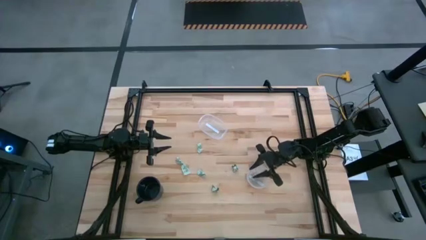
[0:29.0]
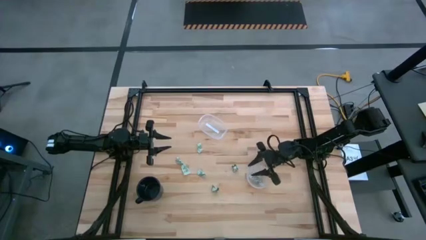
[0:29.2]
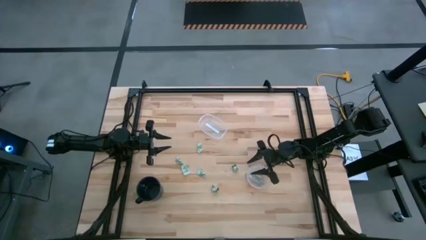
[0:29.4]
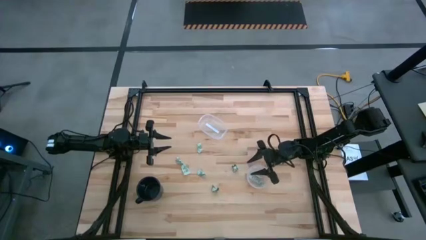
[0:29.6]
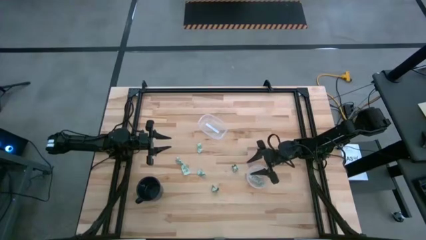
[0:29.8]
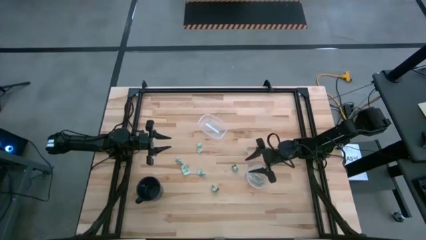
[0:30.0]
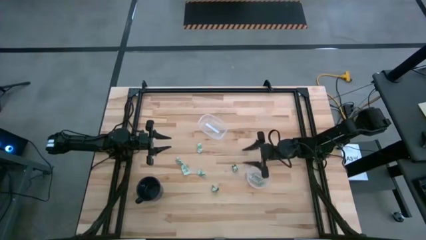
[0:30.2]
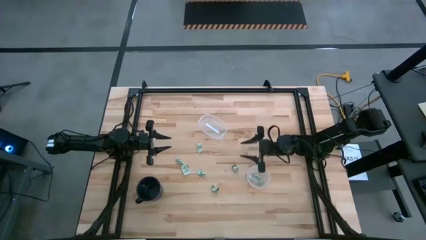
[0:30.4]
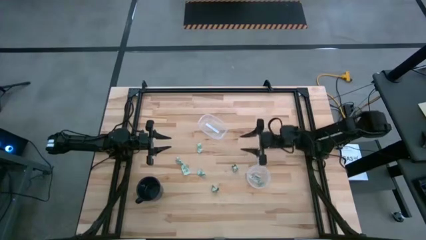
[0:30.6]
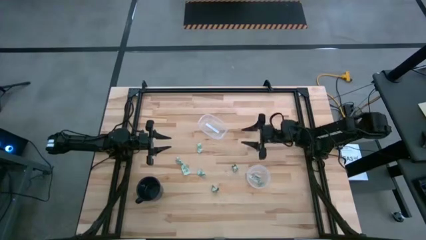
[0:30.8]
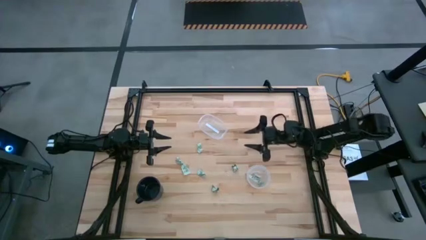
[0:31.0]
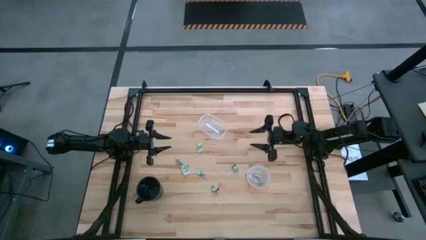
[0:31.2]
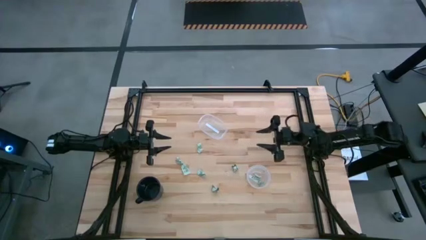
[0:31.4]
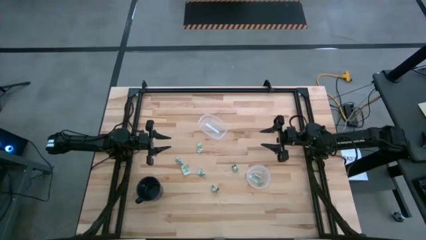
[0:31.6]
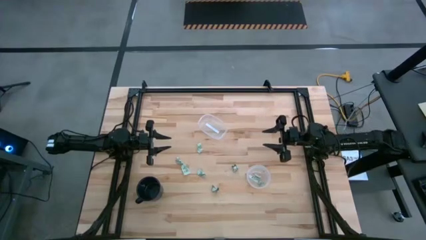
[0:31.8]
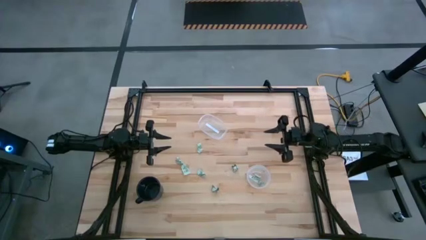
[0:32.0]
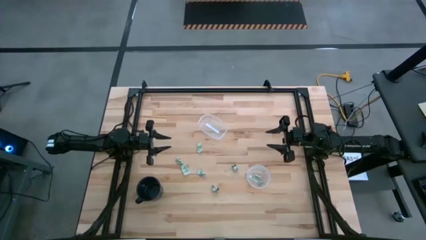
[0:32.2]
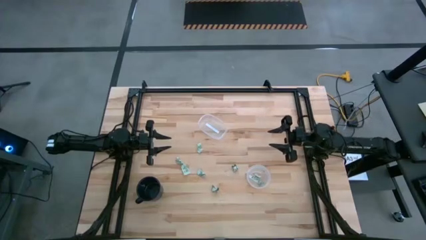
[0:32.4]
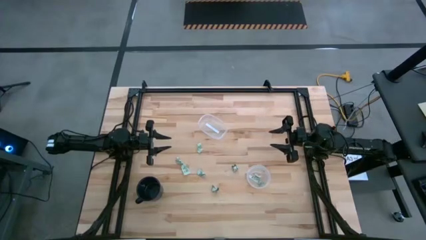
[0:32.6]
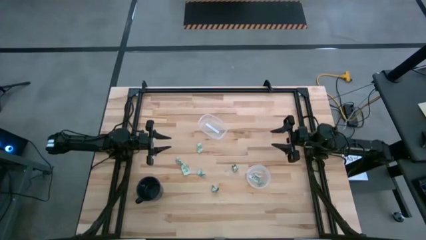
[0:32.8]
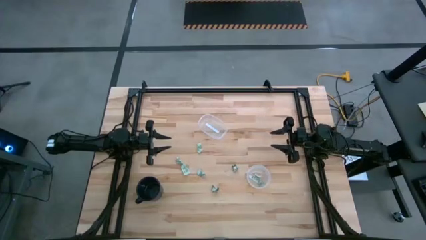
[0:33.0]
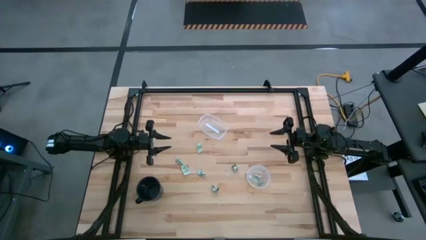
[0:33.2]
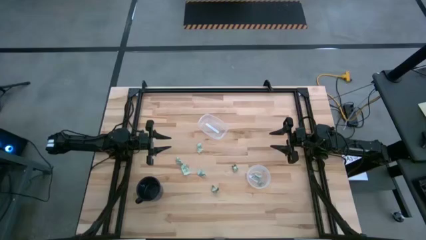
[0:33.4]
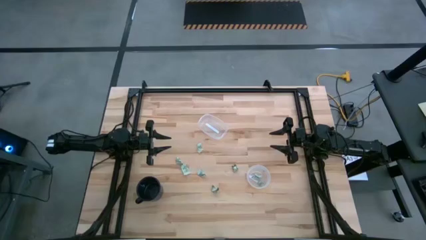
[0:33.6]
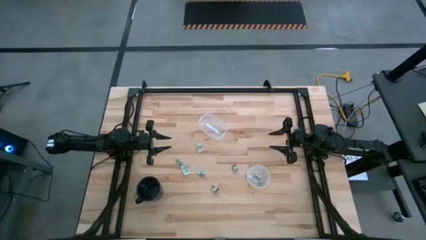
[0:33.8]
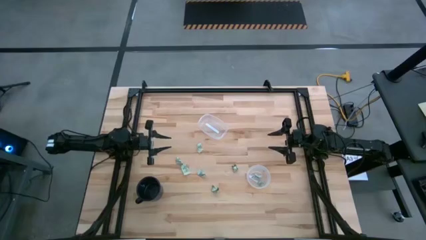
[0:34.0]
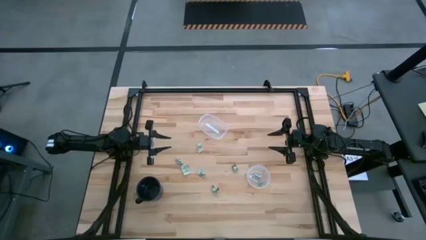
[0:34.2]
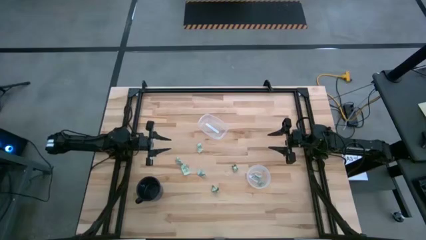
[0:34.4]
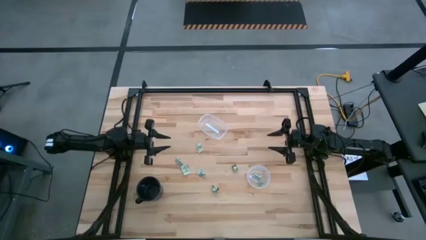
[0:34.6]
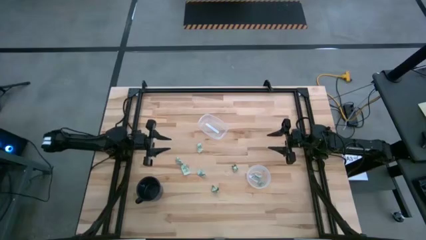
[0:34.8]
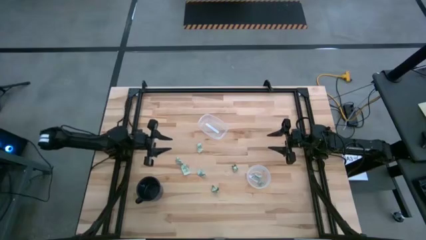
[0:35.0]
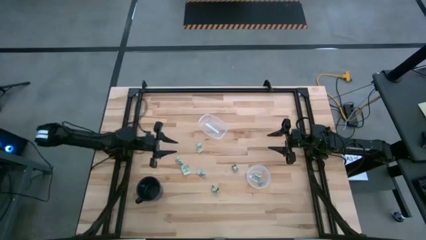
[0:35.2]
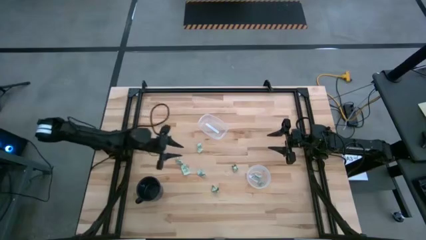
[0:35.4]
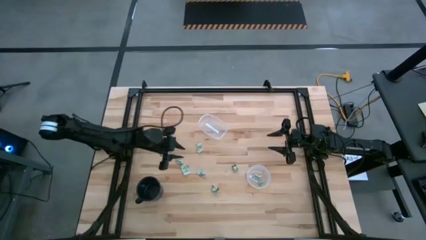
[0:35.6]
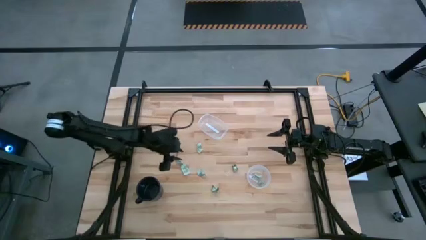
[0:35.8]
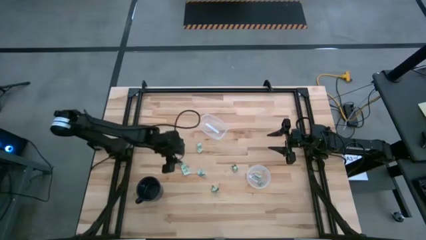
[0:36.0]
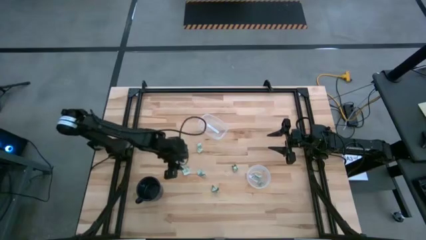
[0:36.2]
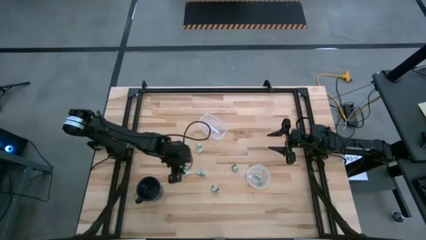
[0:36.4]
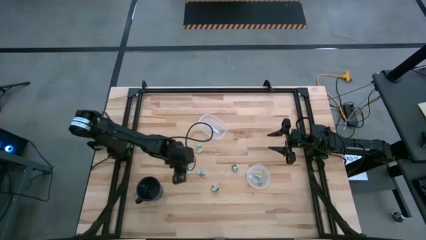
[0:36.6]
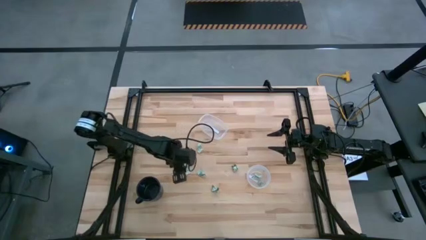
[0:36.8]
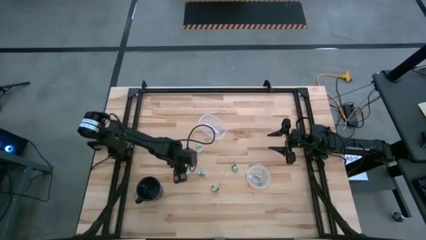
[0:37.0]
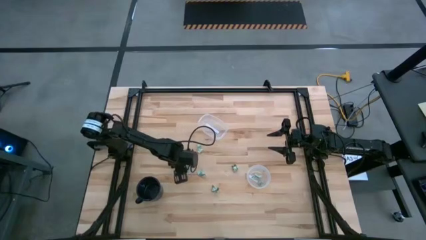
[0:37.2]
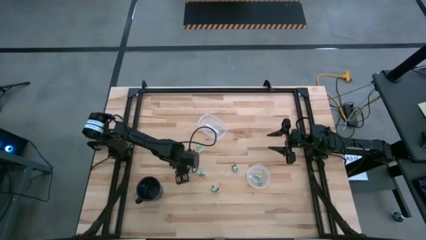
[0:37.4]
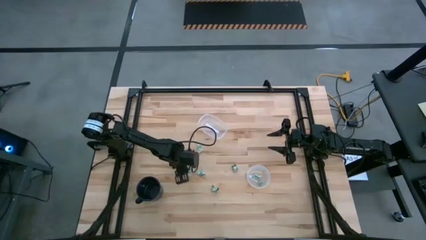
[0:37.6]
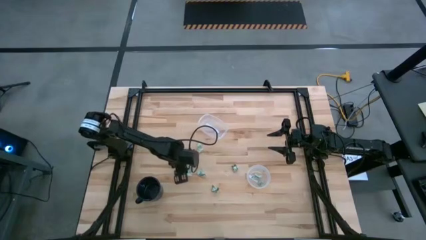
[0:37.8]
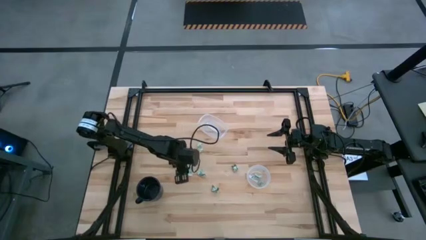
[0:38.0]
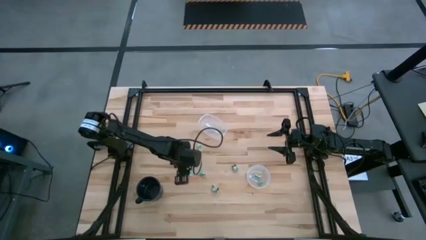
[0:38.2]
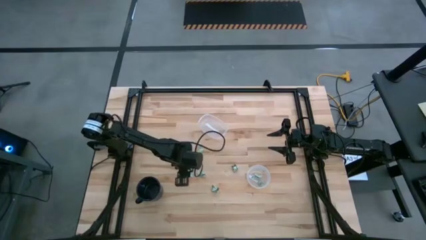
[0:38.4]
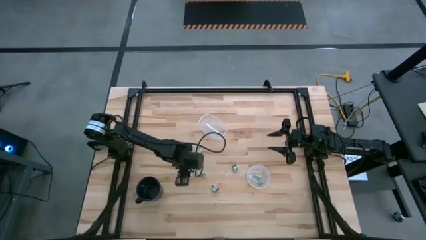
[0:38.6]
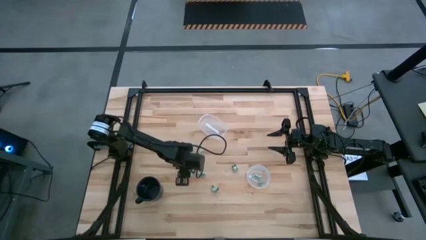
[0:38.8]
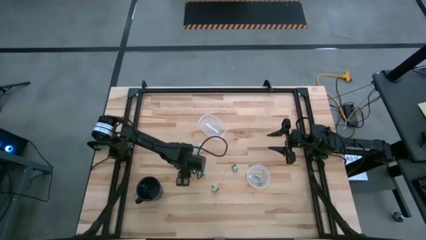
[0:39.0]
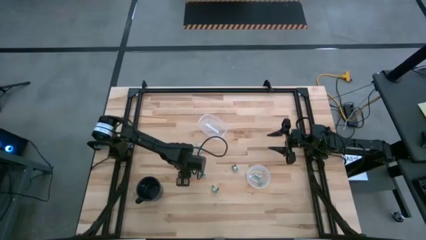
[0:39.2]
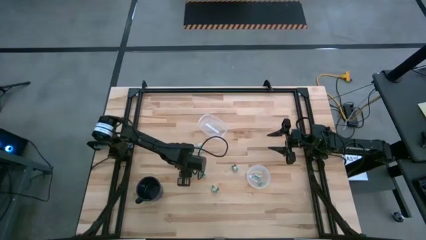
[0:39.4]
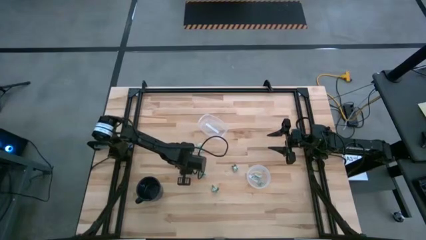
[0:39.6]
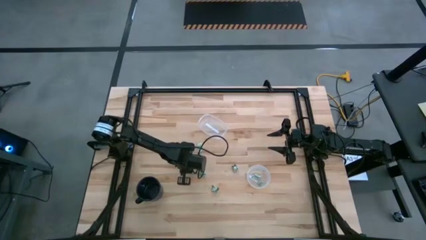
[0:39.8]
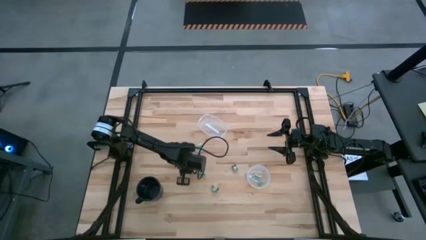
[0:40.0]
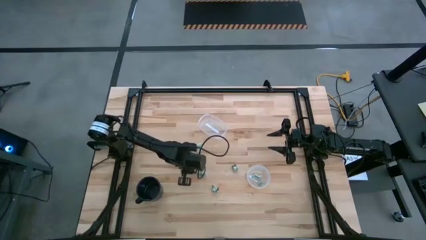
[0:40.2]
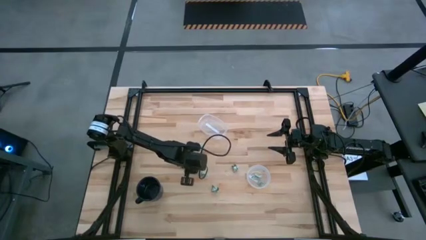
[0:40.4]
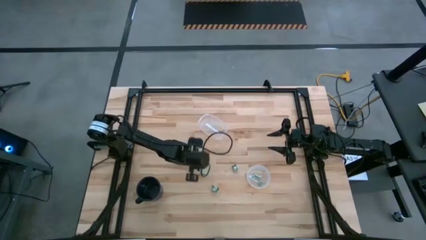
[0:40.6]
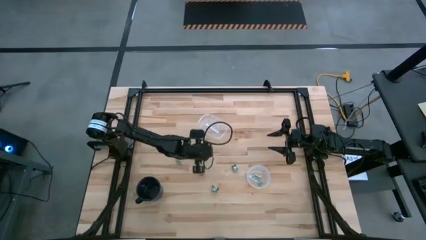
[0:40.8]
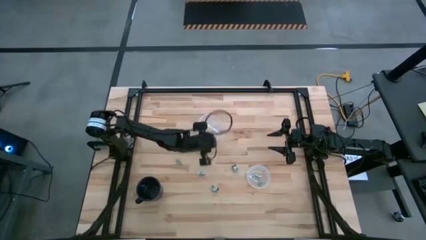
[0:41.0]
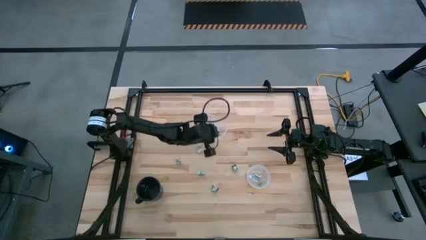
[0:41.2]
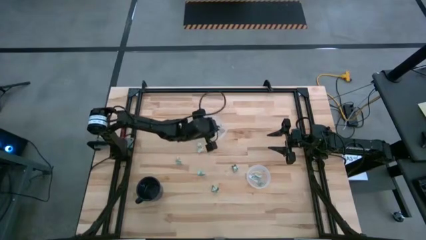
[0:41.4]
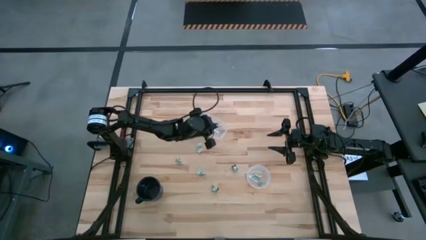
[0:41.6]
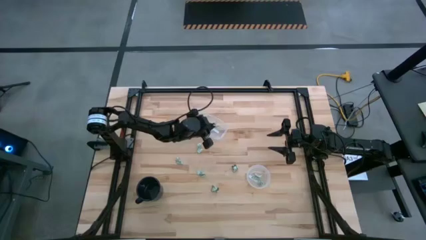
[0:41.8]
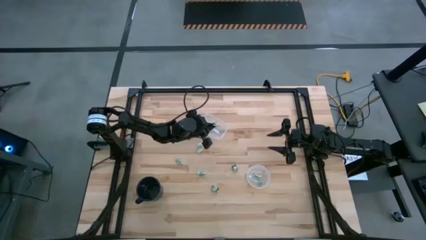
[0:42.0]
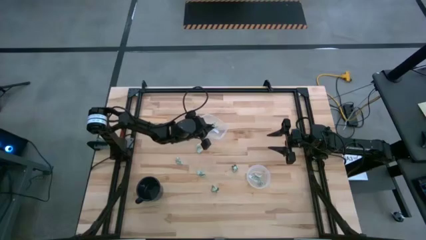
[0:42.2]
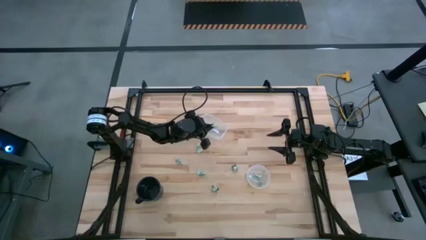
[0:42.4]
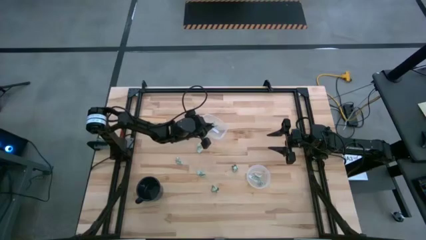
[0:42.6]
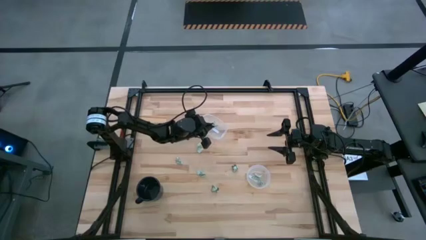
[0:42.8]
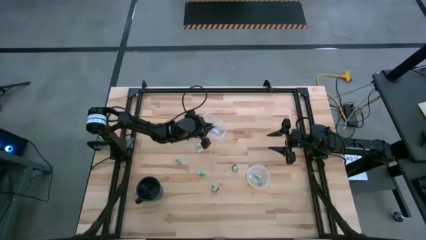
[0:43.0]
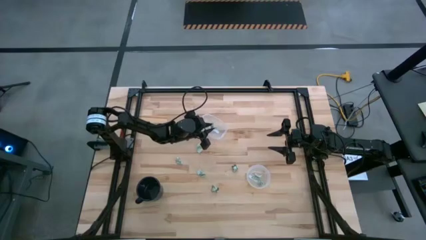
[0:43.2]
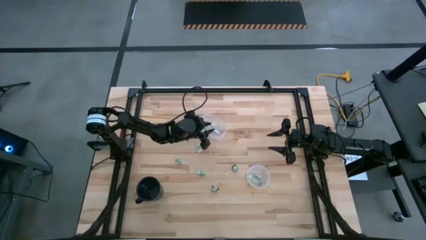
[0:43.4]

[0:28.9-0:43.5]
Task: Pick and place Stevia / Truvia into bins
Put the stevia packet into the oval transparent container
